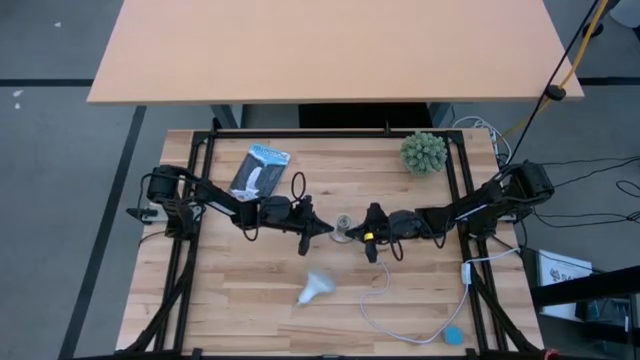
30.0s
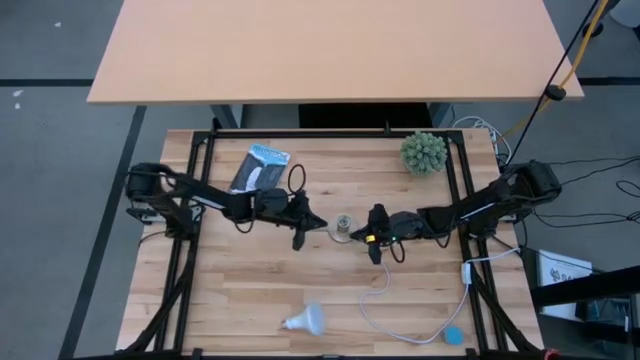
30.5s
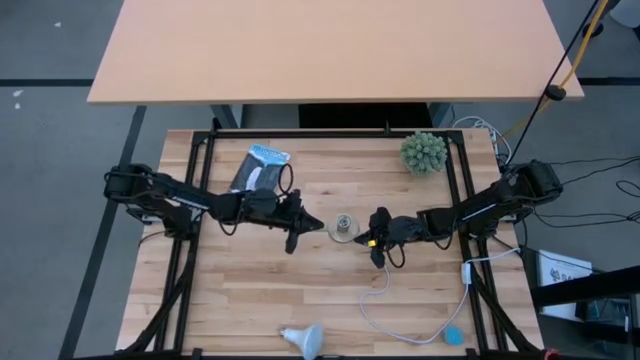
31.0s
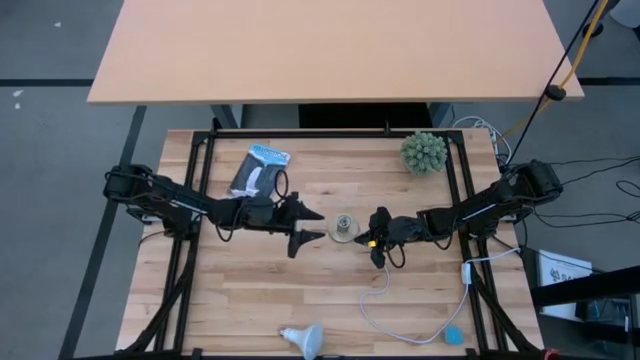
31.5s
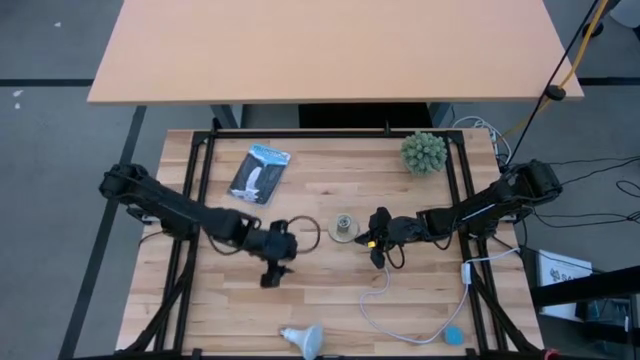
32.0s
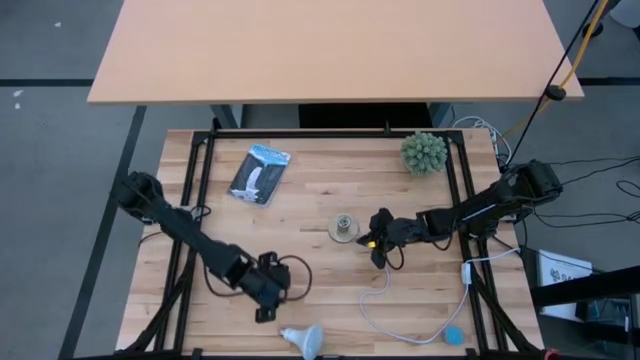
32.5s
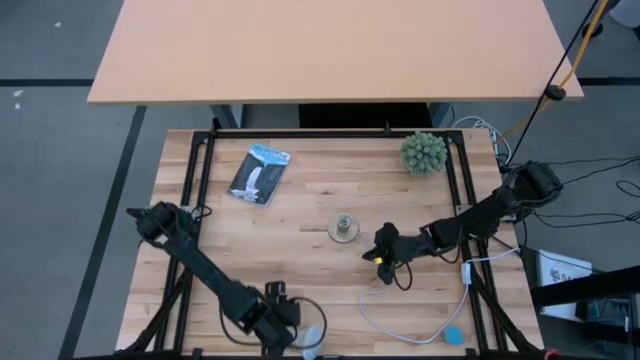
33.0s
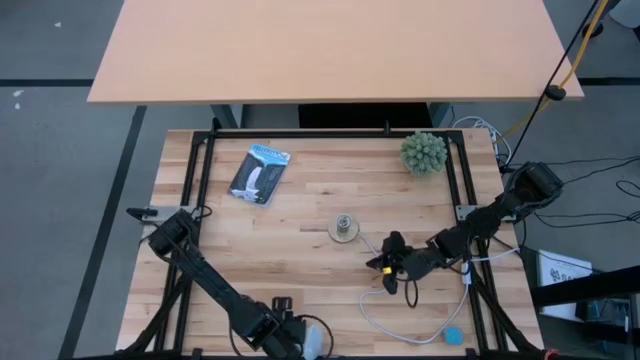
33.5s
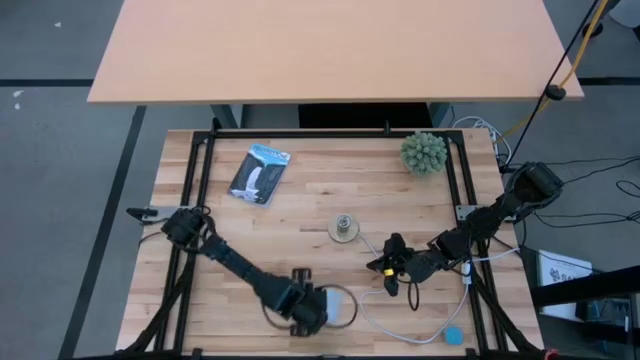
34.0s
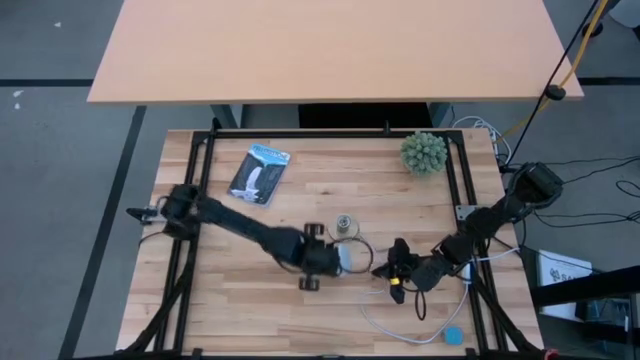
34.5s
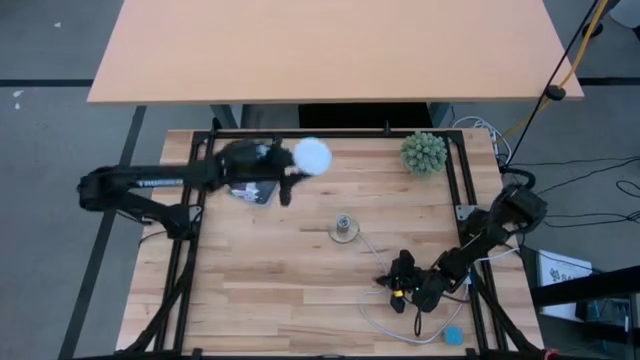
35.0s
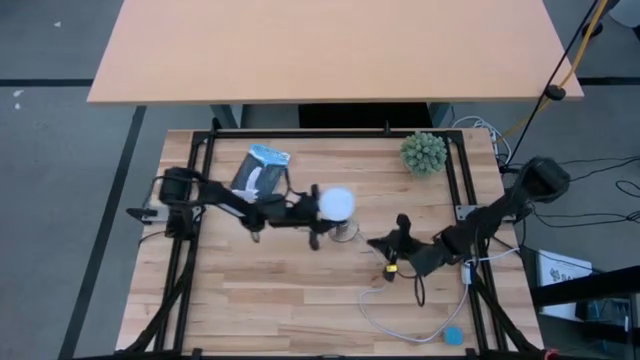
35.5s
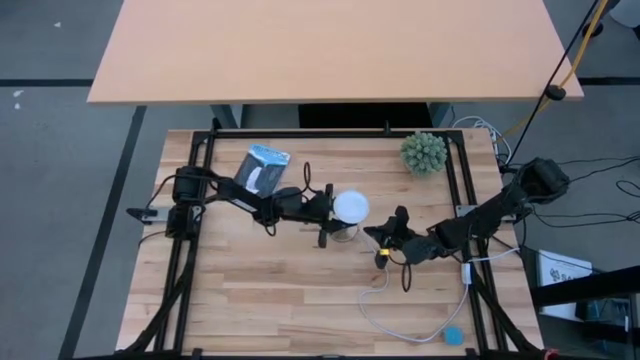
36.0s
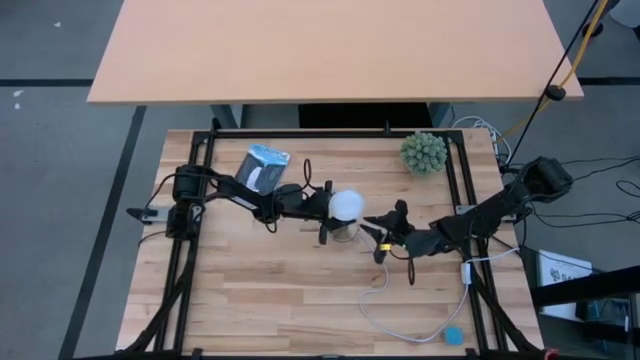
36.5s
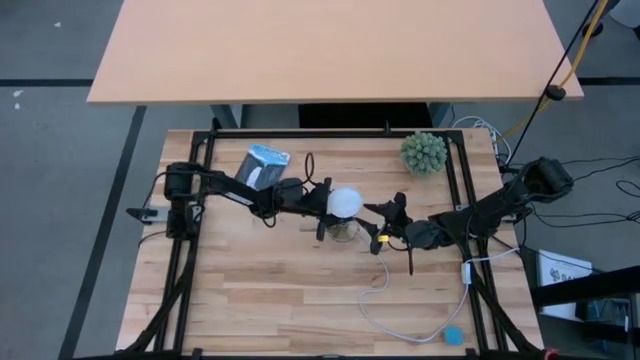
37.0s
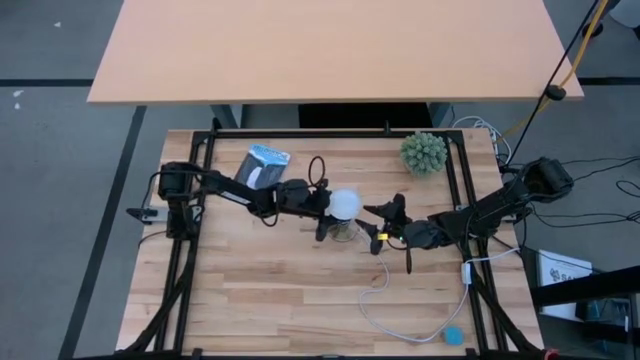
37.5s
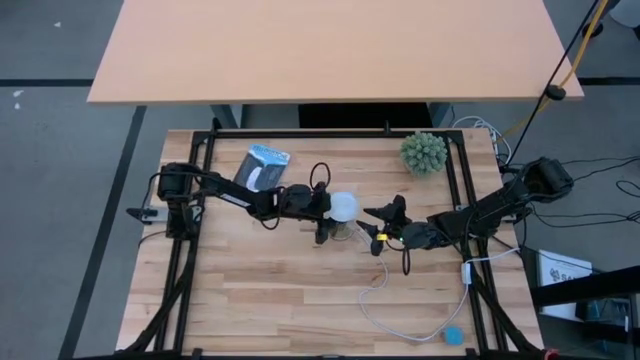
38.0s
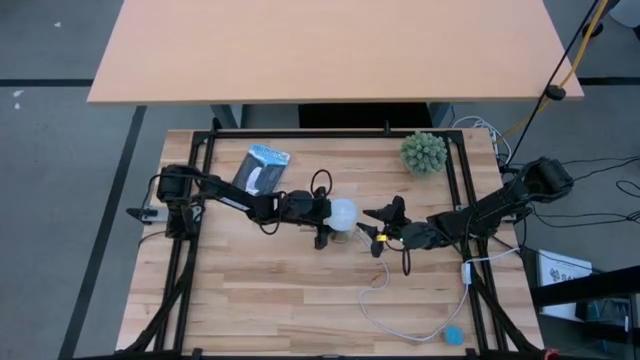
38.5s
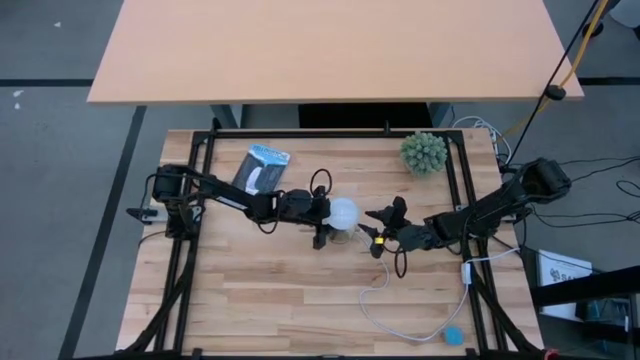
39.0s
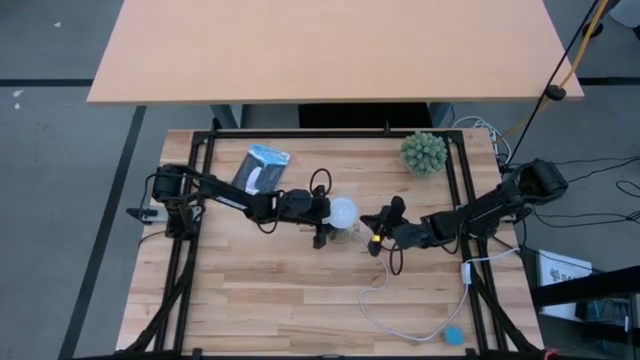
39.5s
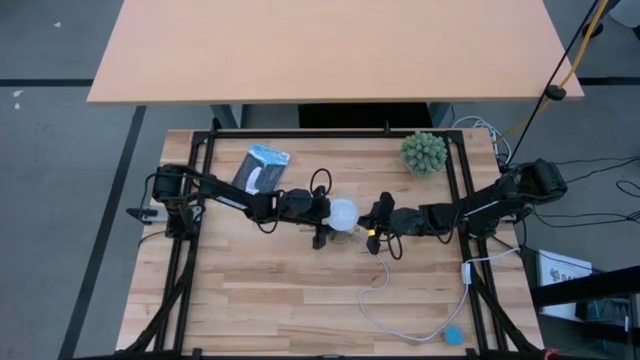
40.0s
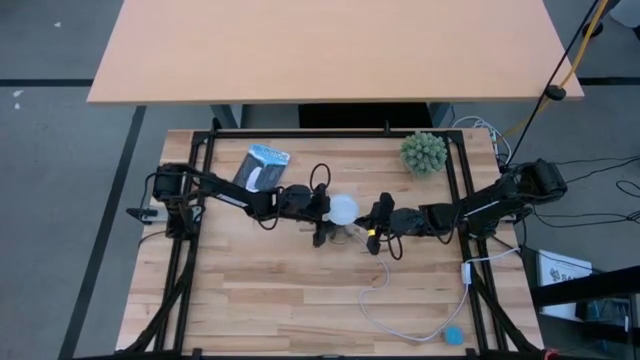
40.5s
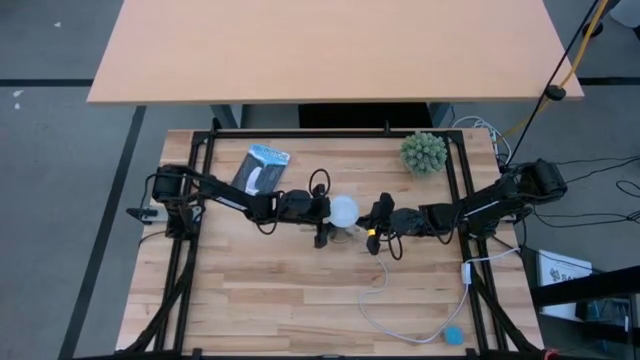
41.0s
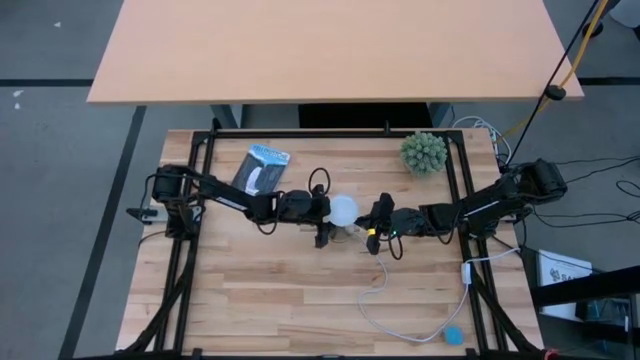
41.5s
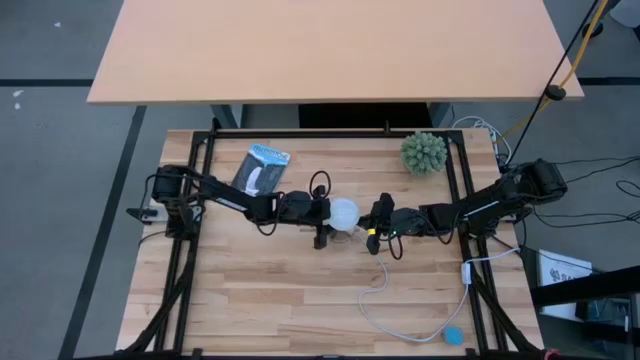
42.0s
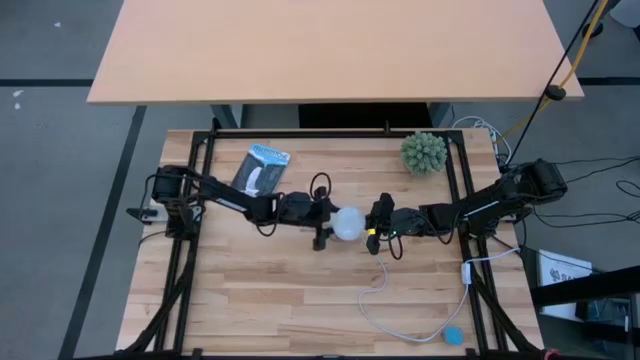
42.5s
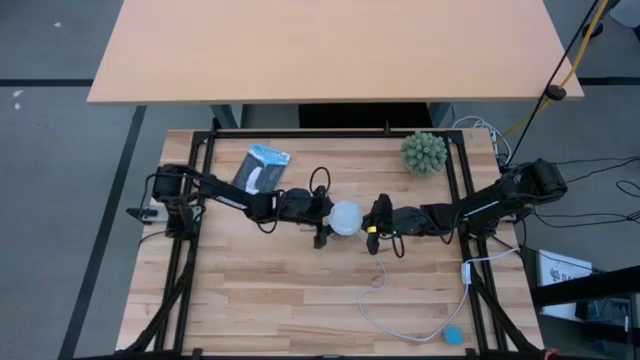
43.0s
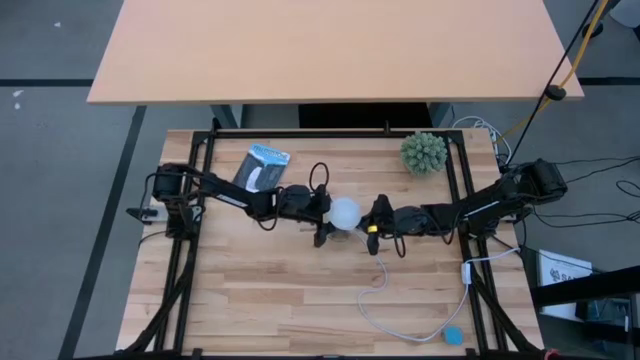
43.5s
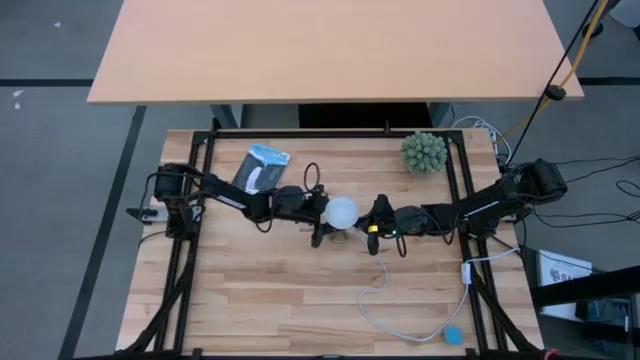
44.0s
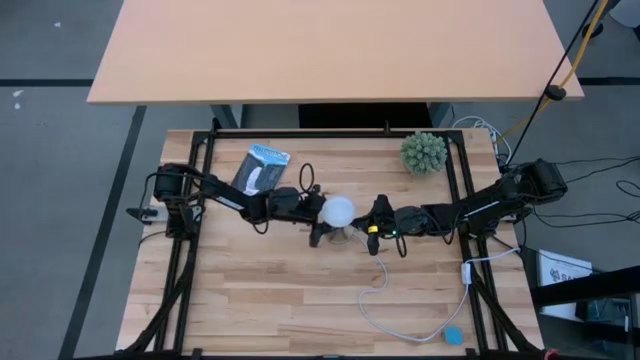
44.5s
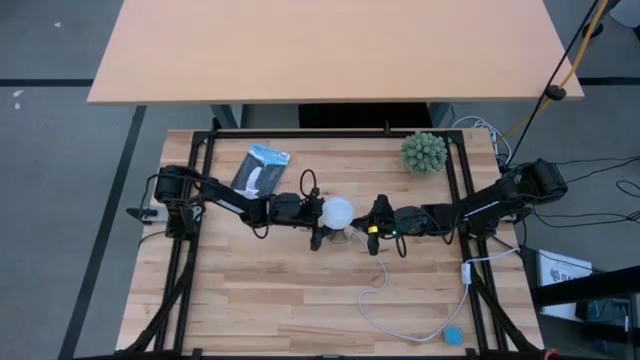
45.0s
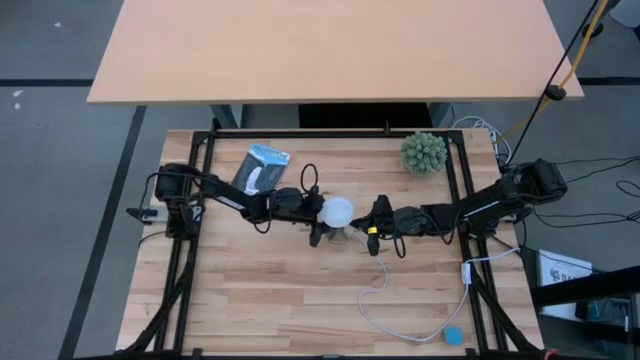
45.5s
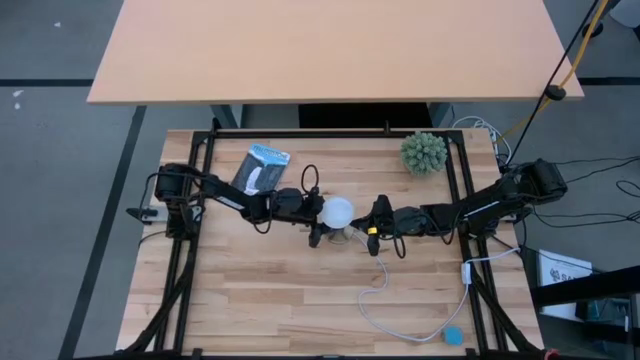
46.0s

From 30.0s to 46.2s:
Task: Screw lightbulb
Insert the white lightbulb into the gold lamp

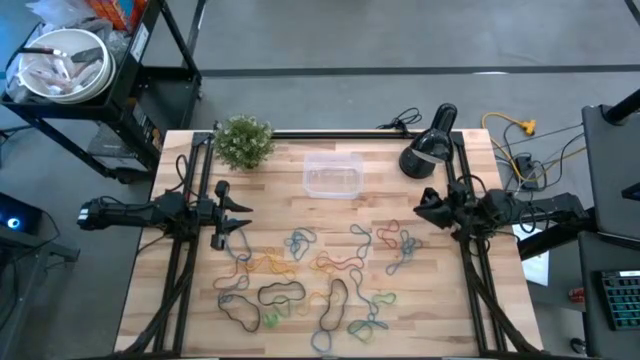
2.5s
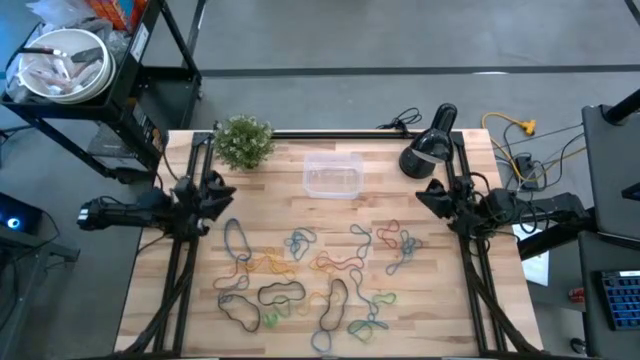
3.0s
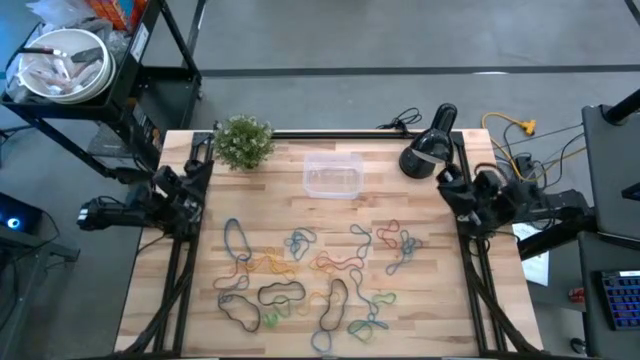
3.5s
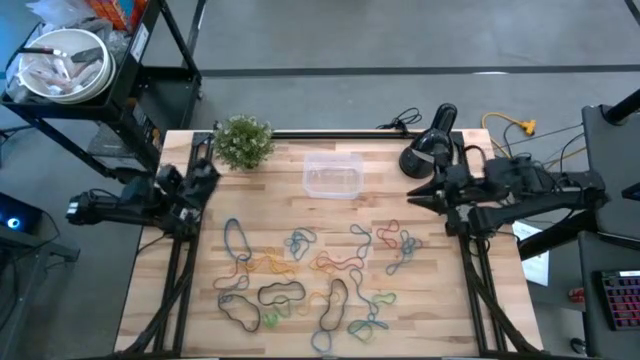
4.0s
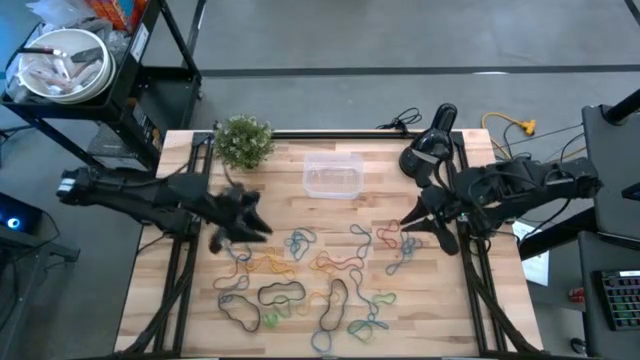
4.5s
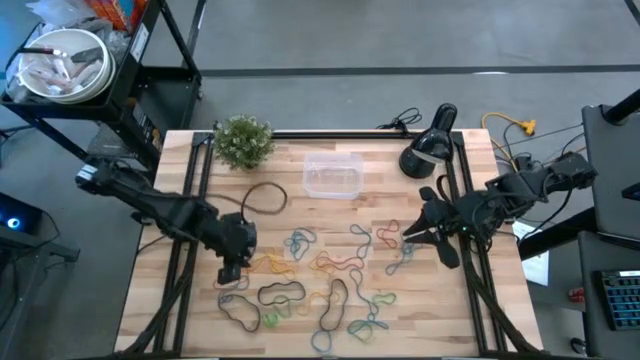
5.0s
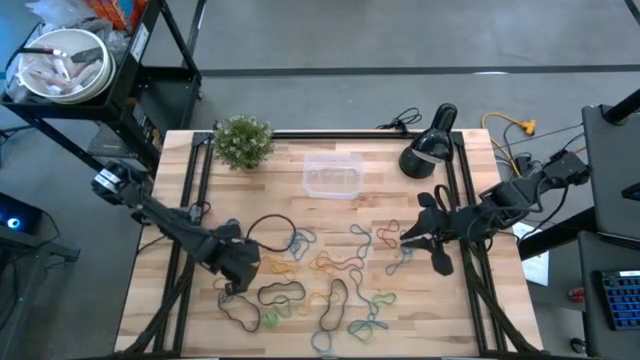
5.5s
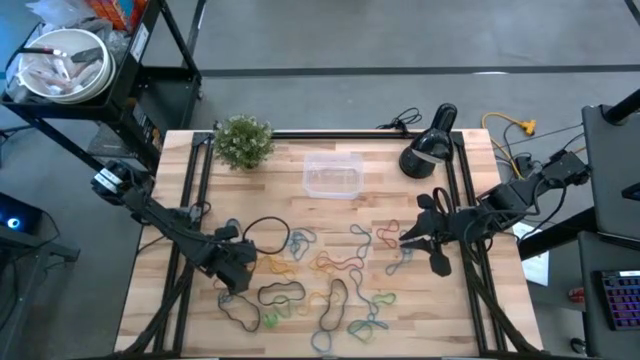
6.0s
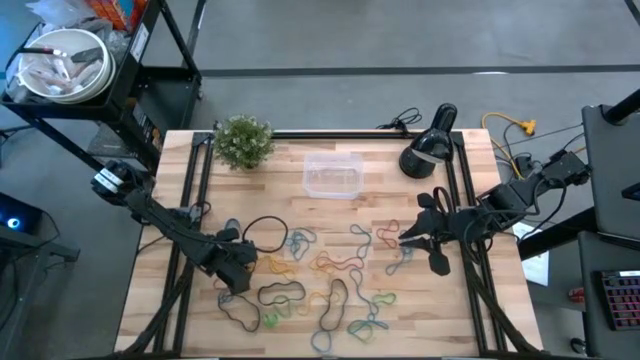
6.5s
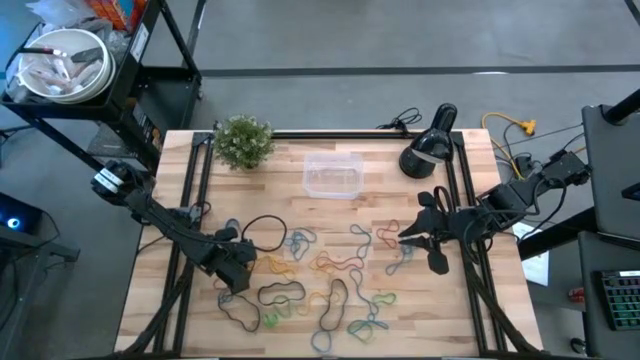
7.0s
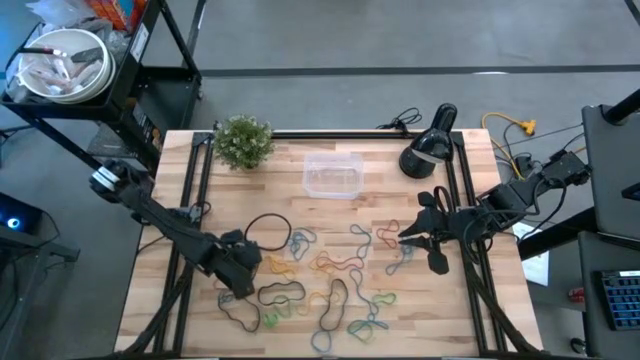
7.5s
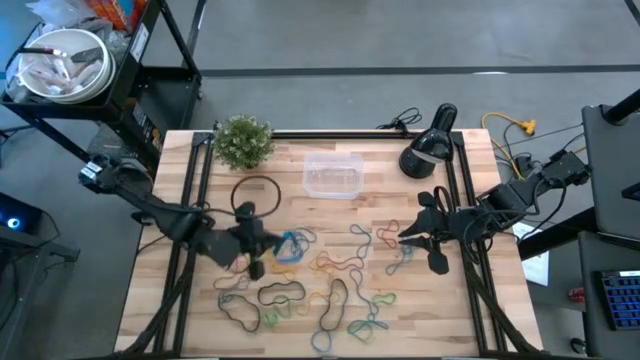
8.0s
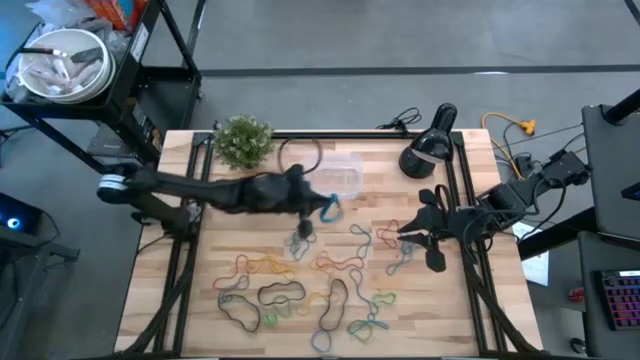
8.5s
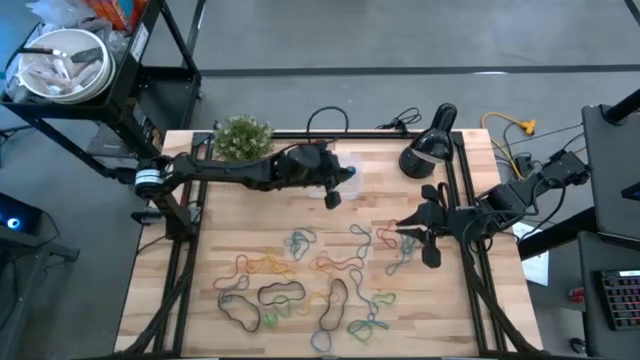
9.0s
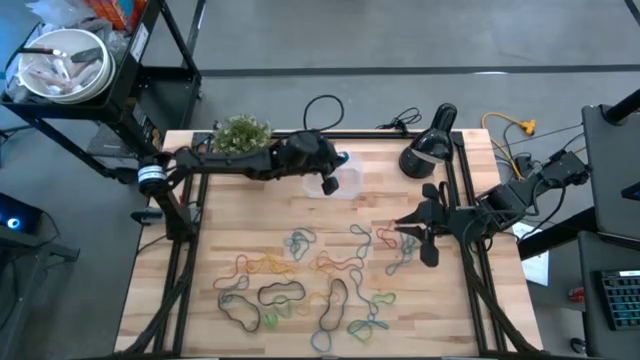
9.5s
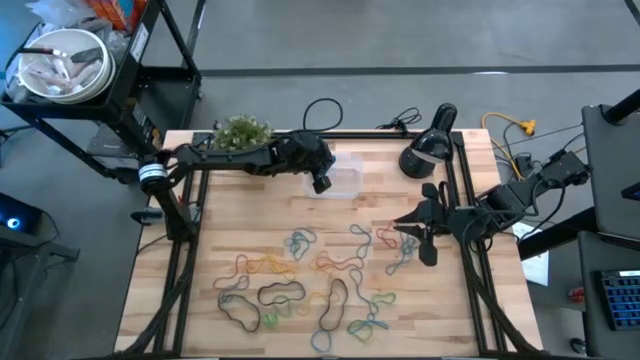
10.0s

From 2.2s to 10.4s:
Task: Pick and place rubber bands into bin
Put the blue rubberband into the transparent bin
